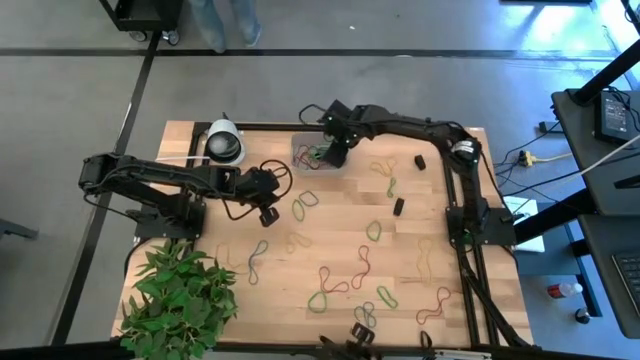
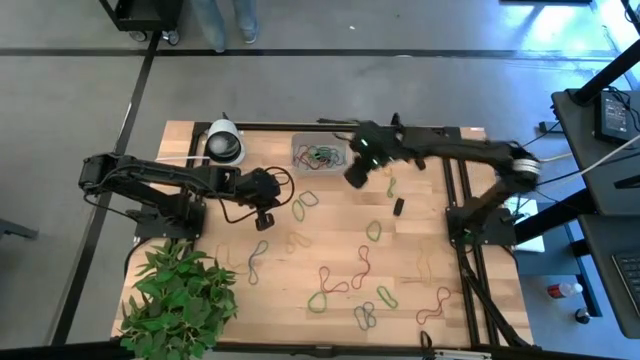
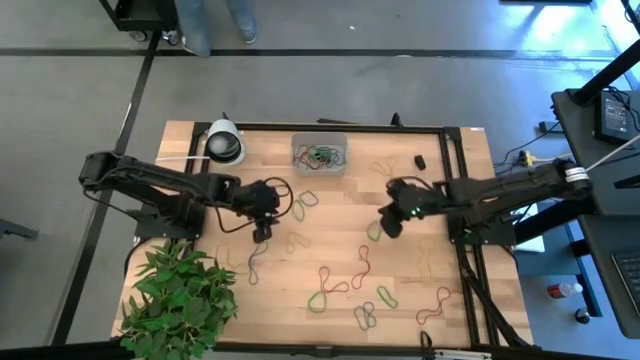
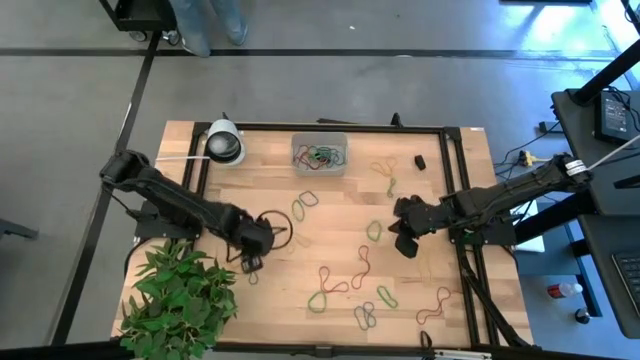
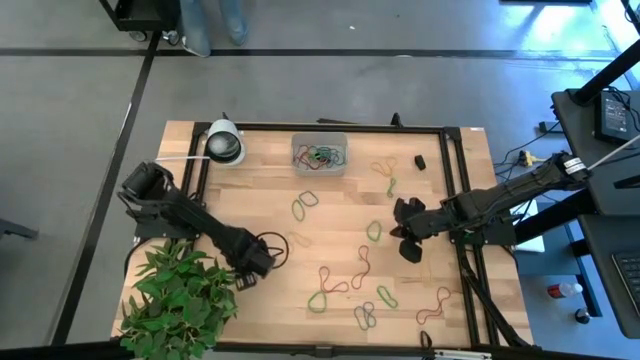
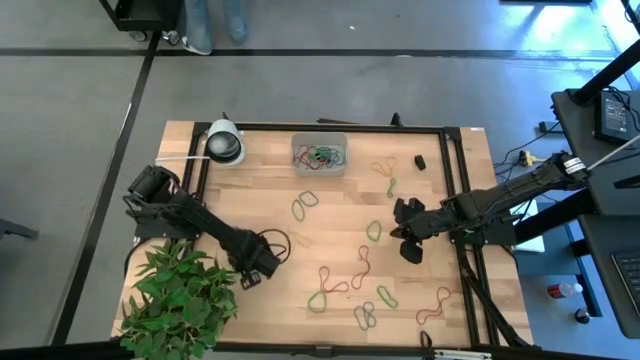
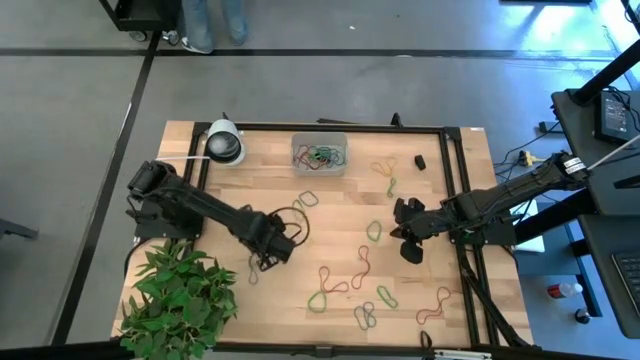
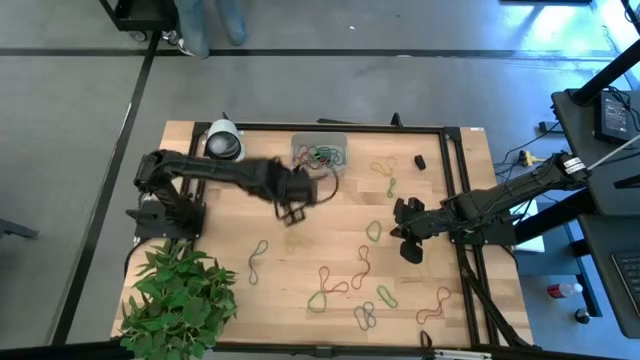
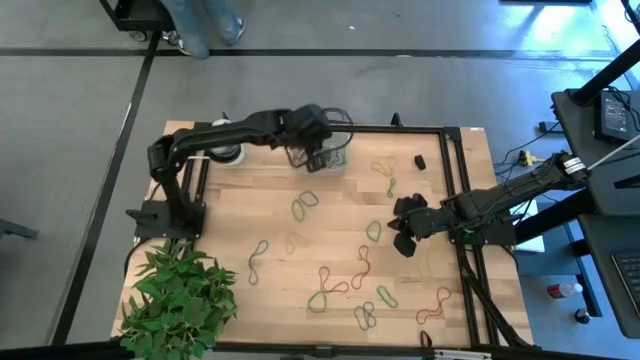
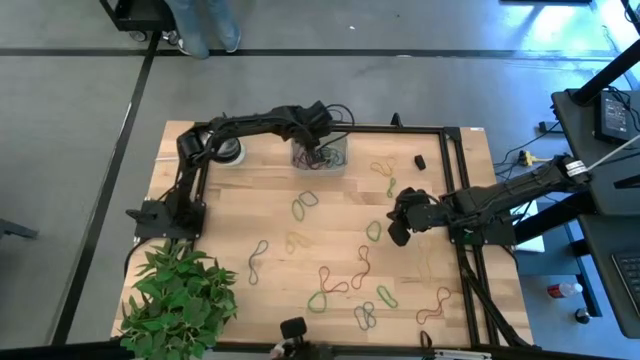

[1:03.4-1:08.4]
Task: Pick and place rubber bands into bin
Put the yellow rubber band into the white bin

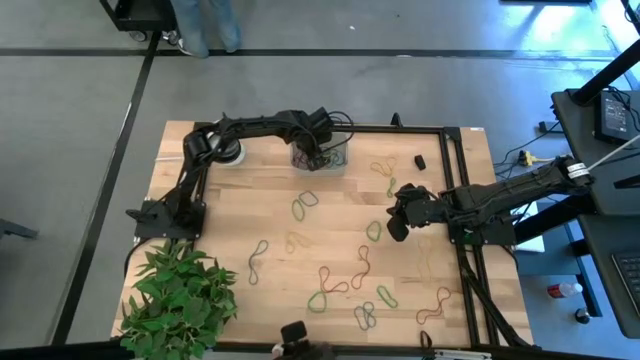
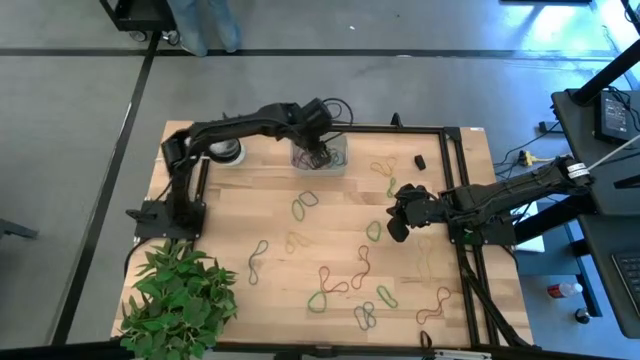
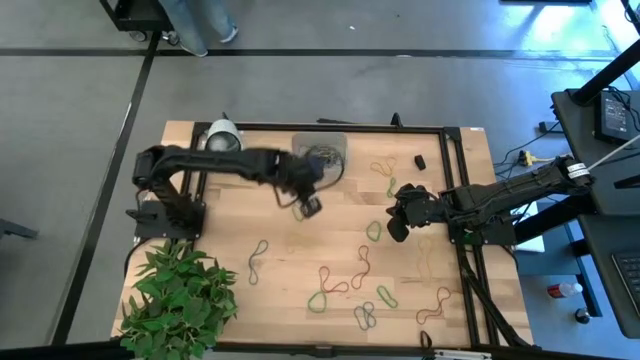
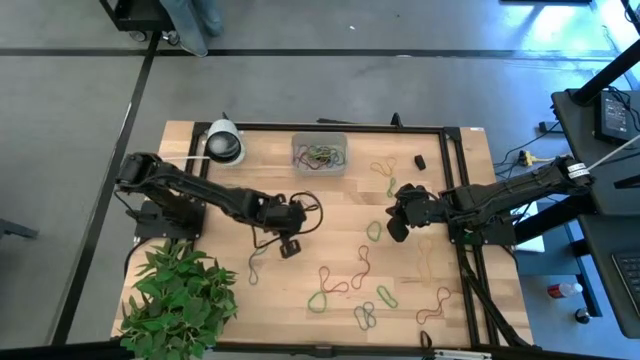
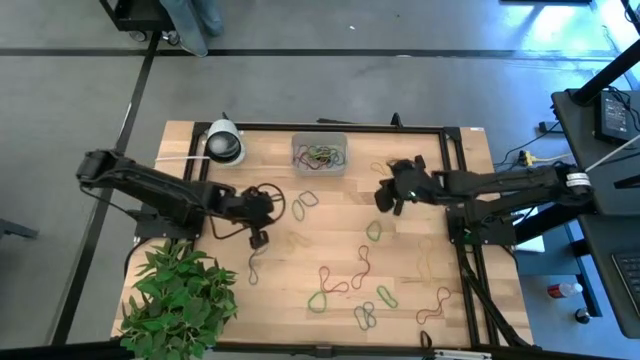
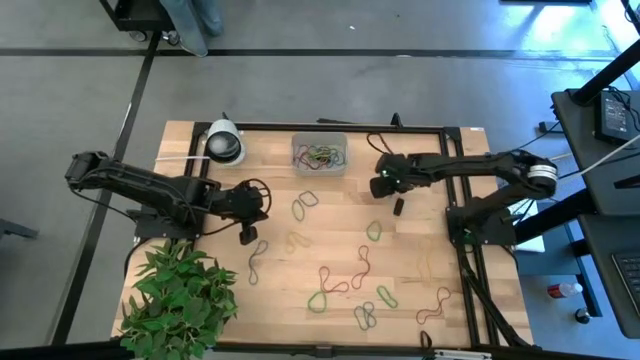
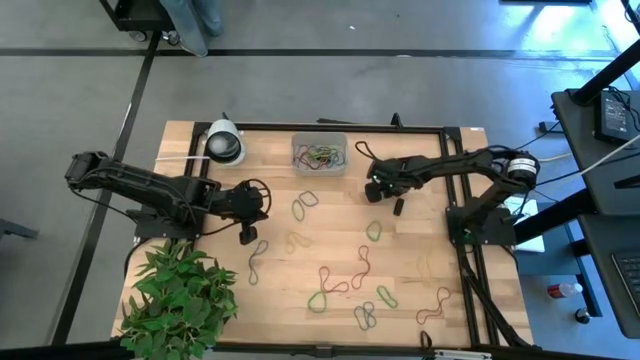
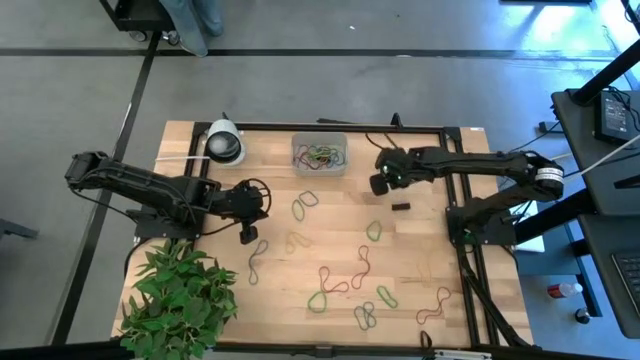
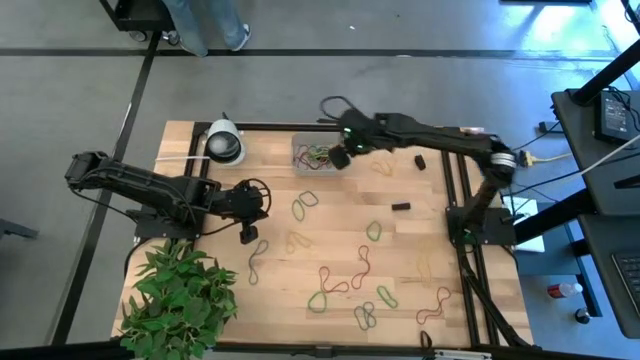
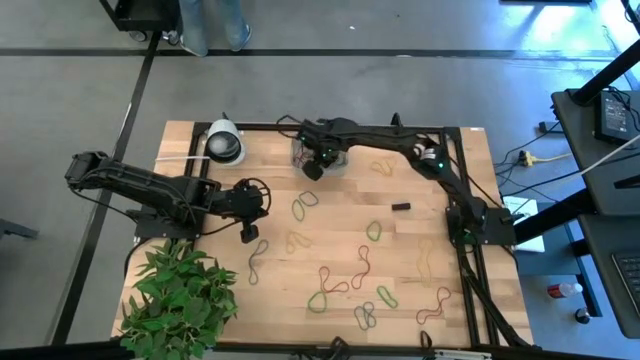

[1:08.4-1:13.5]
Put the green rubber band into the white bin

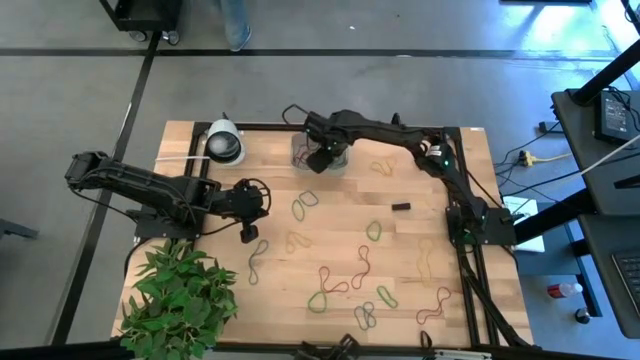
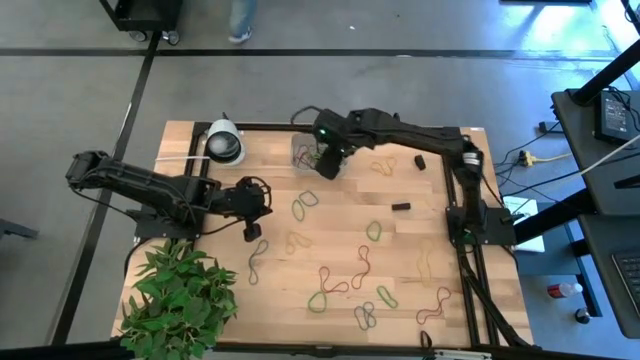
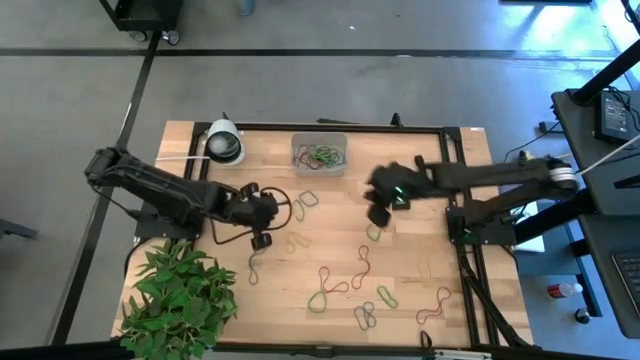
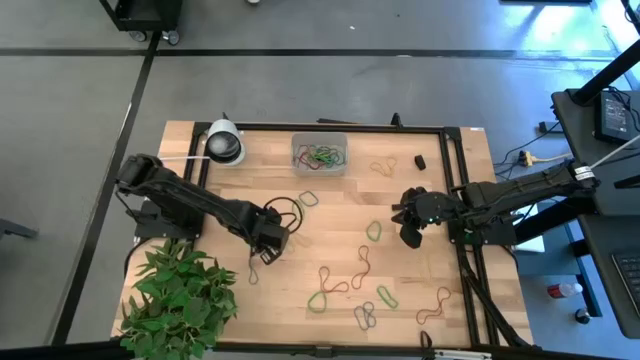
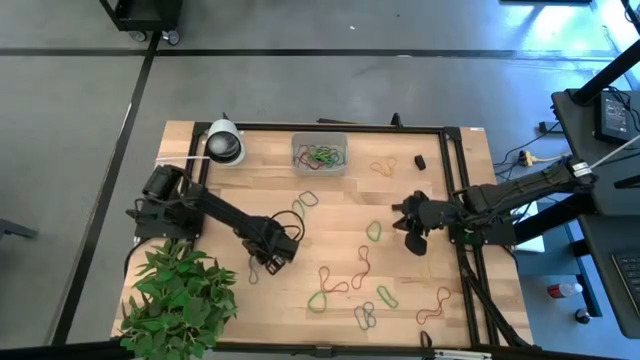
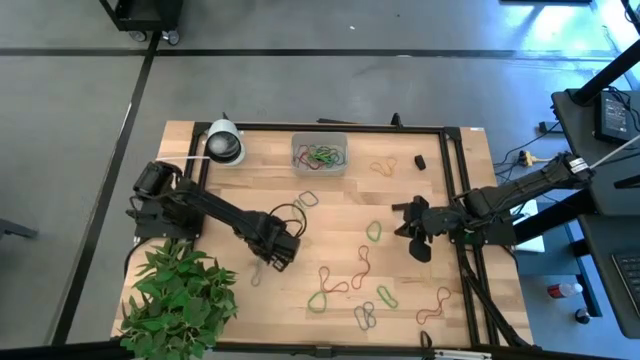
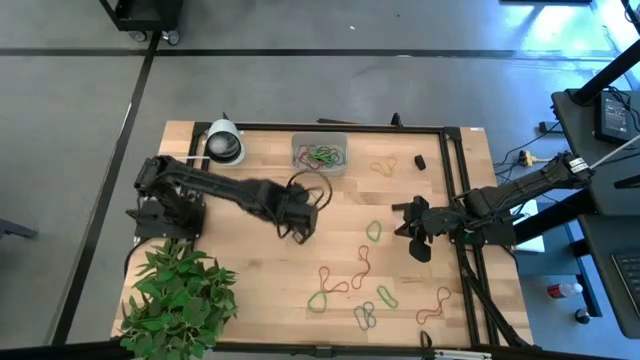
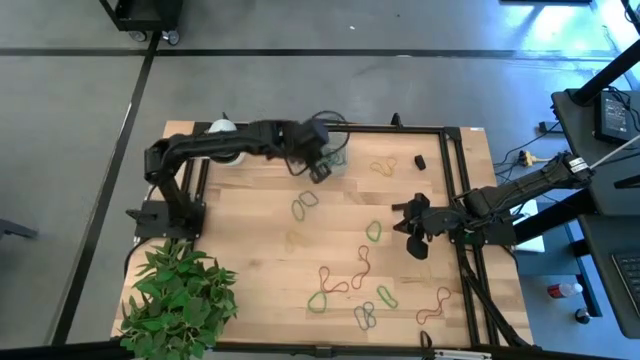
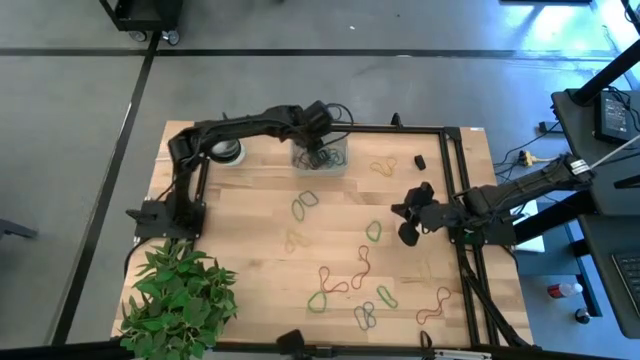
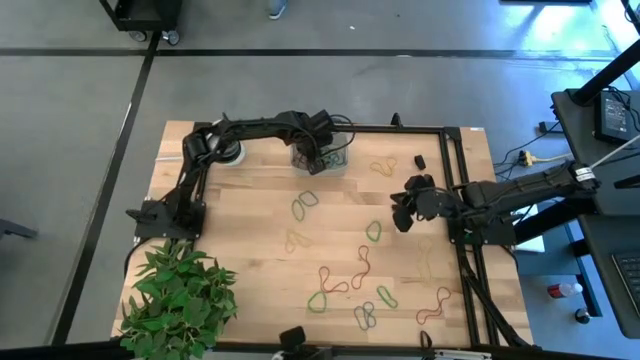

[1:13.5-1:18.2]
Put the blue rubber band into the white bin

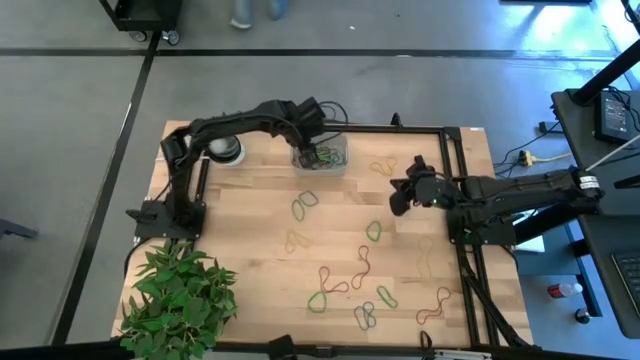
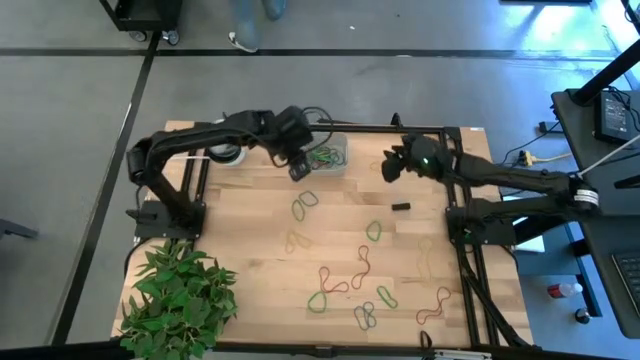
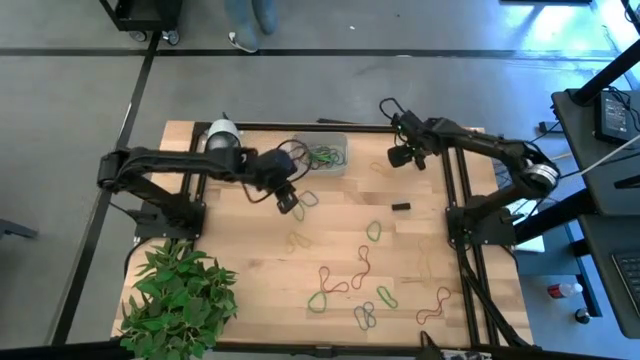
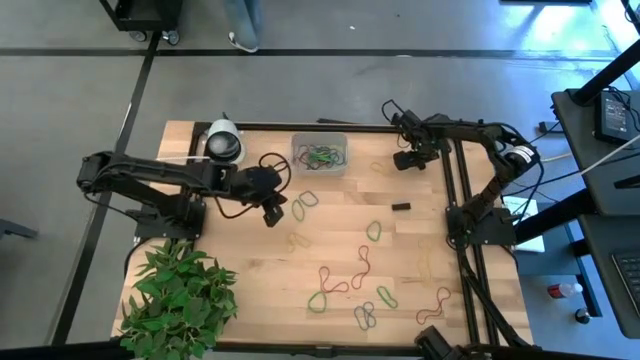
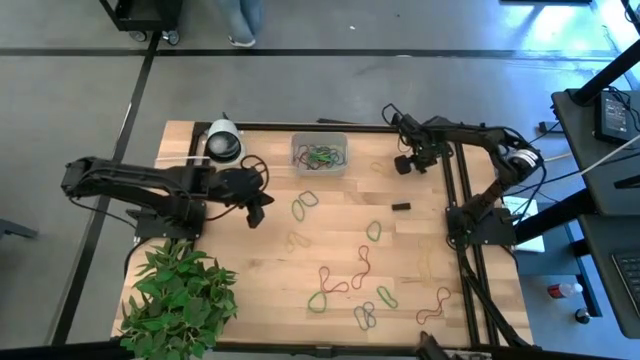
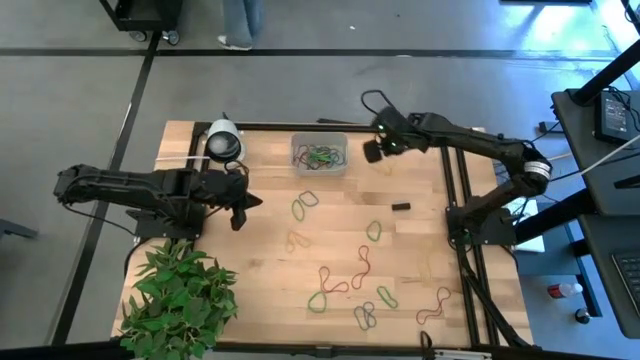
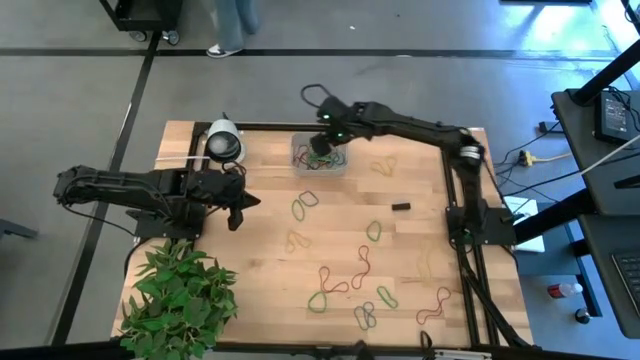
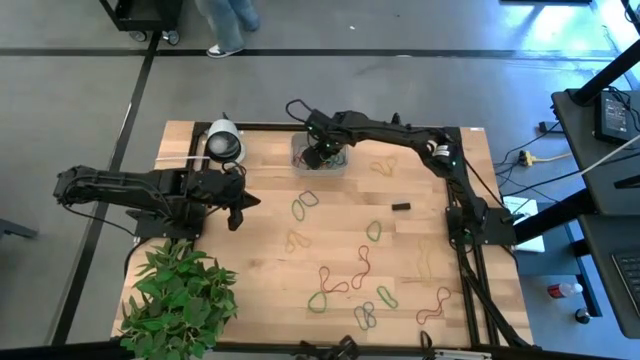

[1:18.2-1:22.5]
Put the black rubber band into the white bin

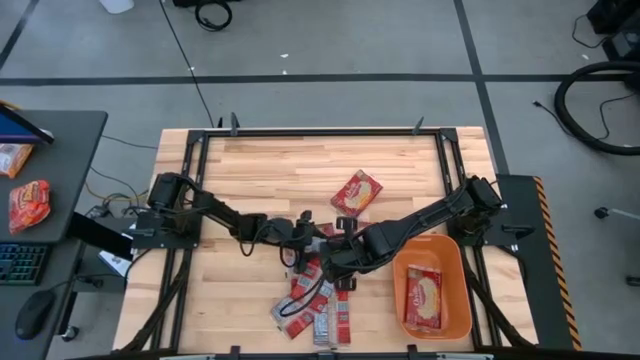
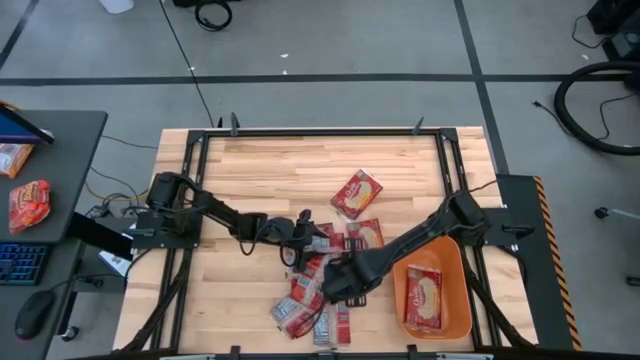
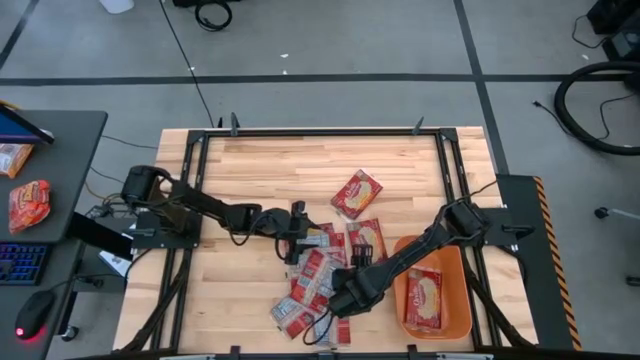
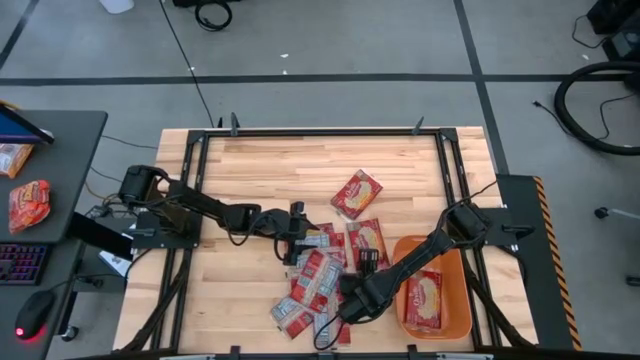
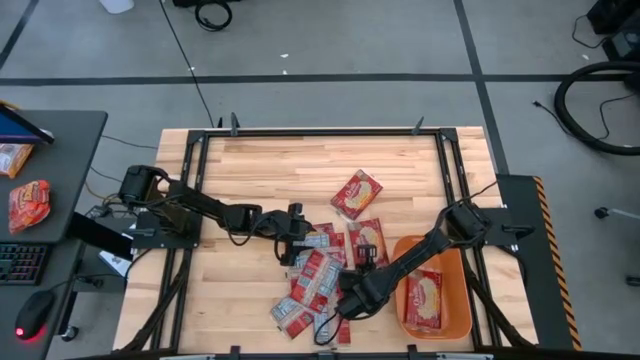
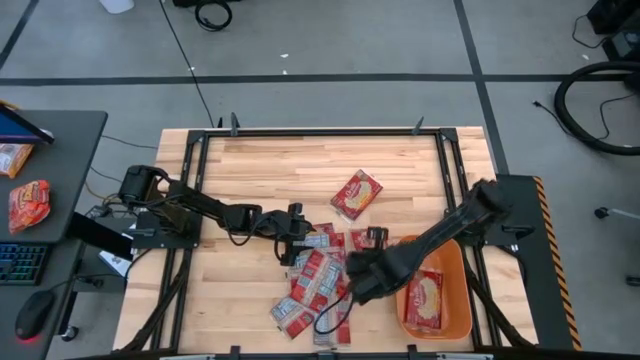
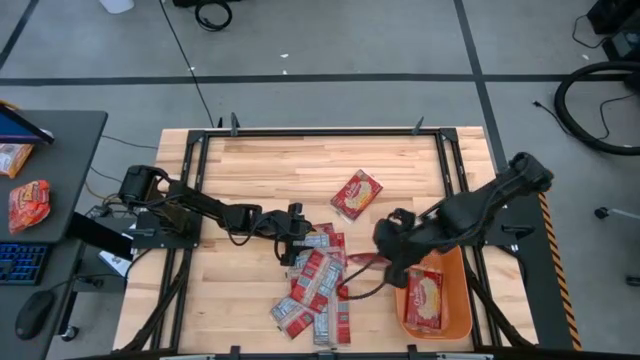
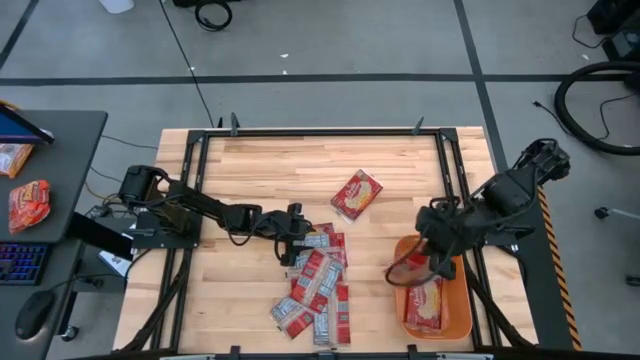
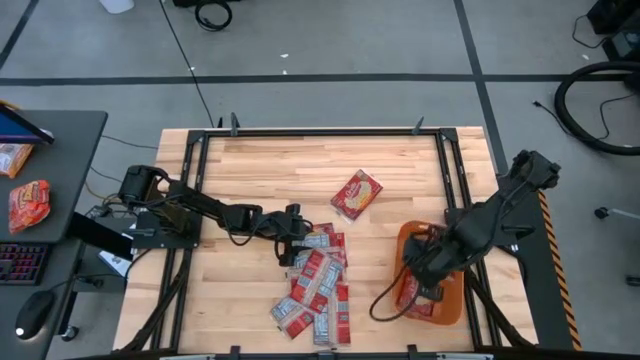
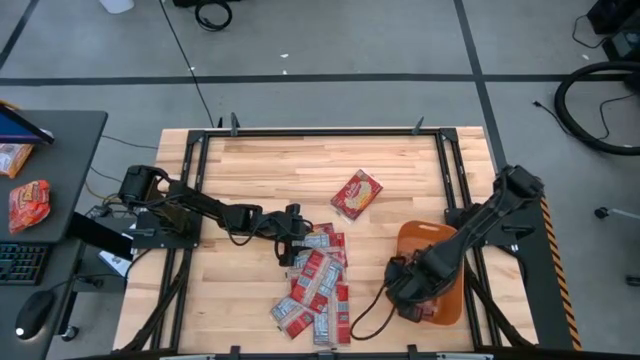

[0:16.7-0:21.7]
Task: Sort popcorn bags into baskets
Put the red popcorn bag into the orange bin
